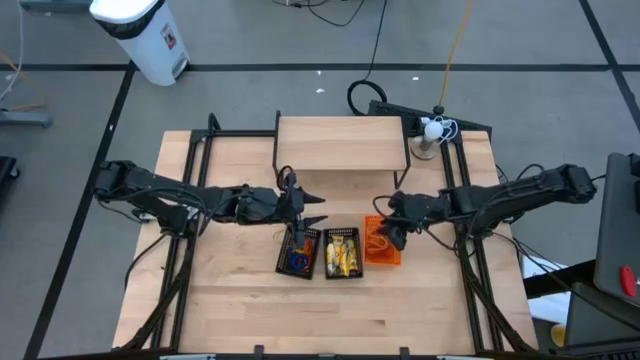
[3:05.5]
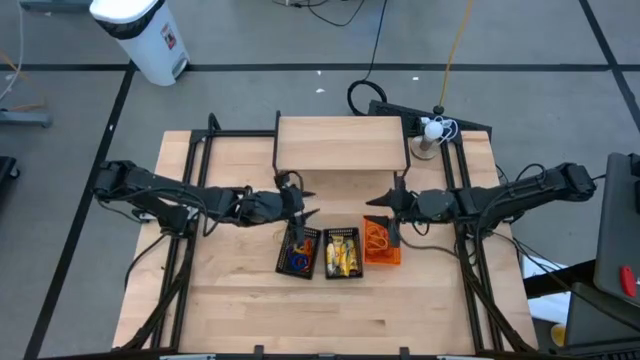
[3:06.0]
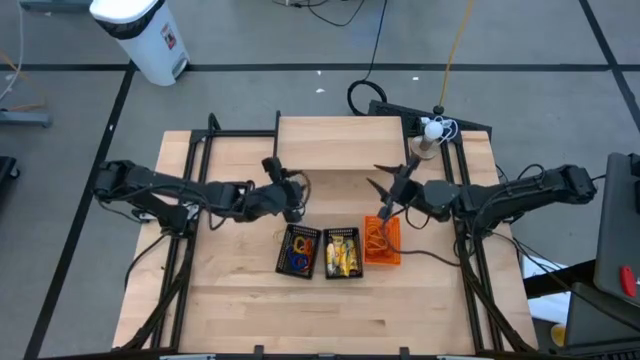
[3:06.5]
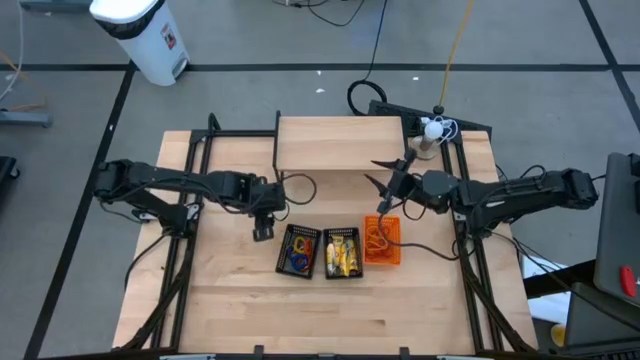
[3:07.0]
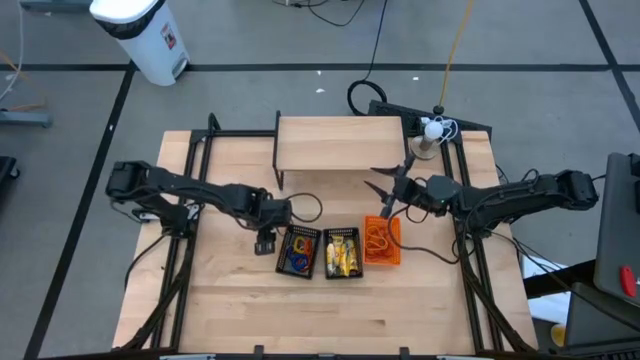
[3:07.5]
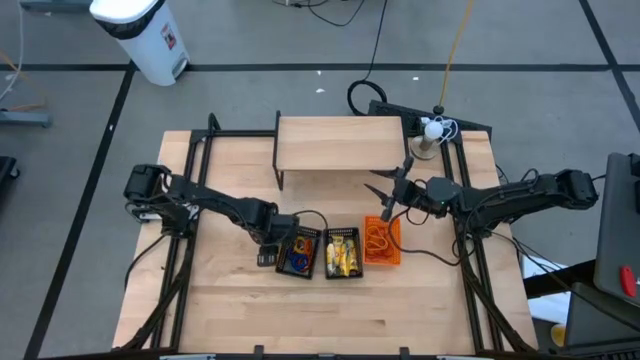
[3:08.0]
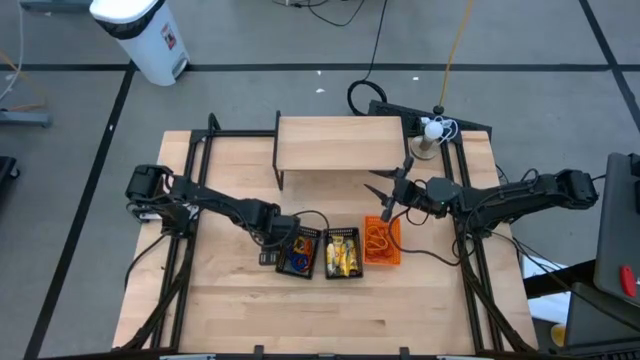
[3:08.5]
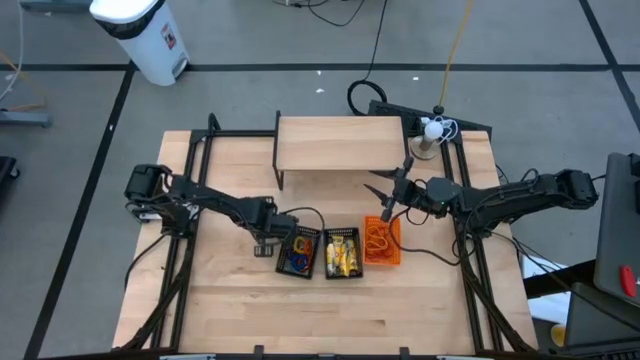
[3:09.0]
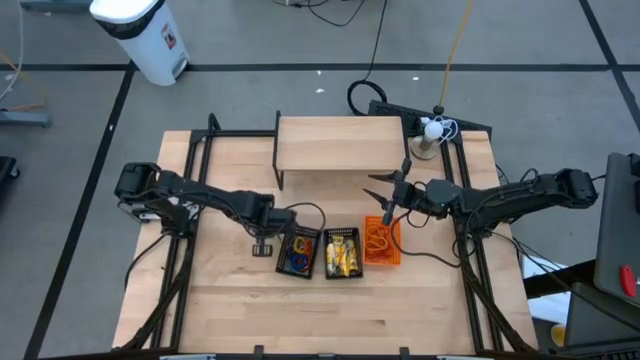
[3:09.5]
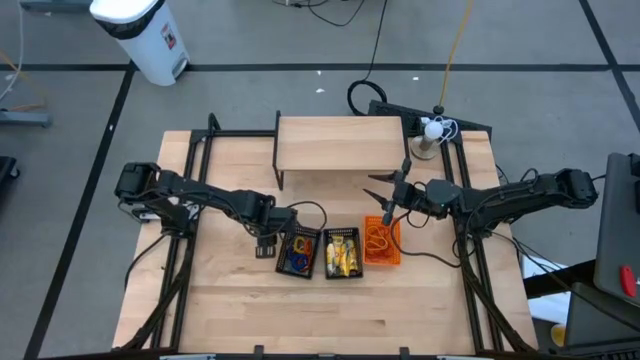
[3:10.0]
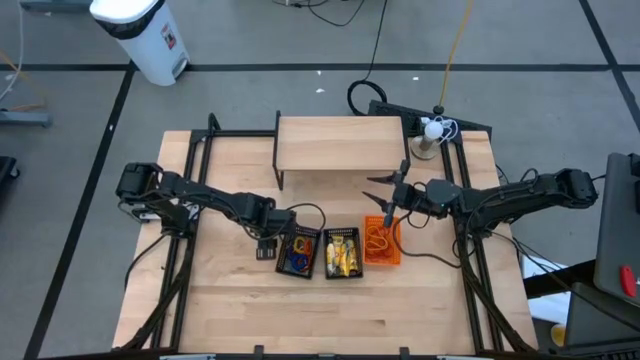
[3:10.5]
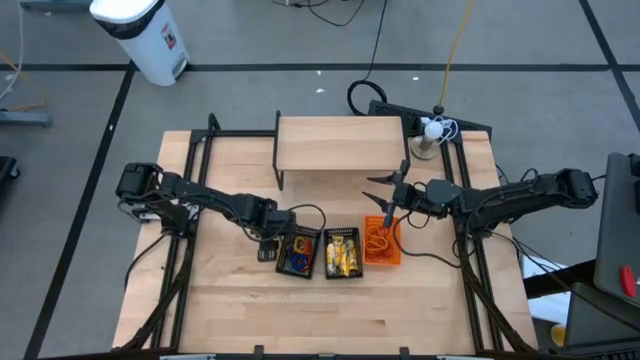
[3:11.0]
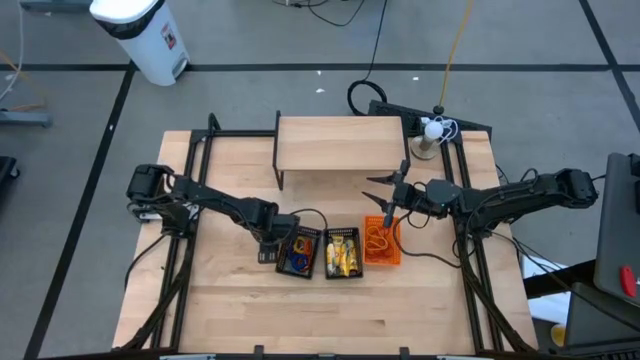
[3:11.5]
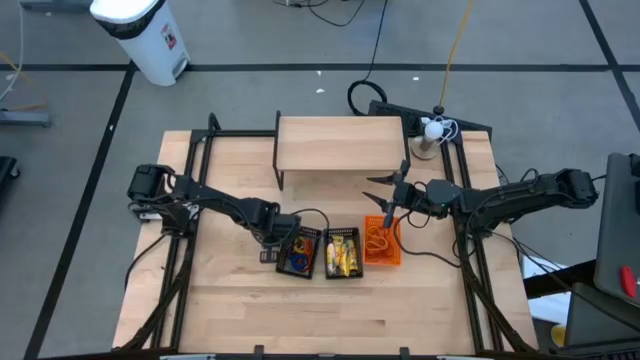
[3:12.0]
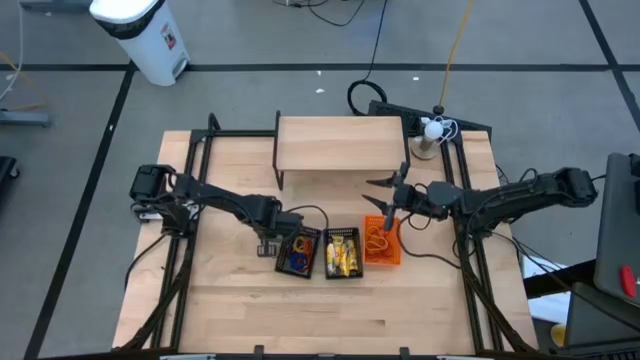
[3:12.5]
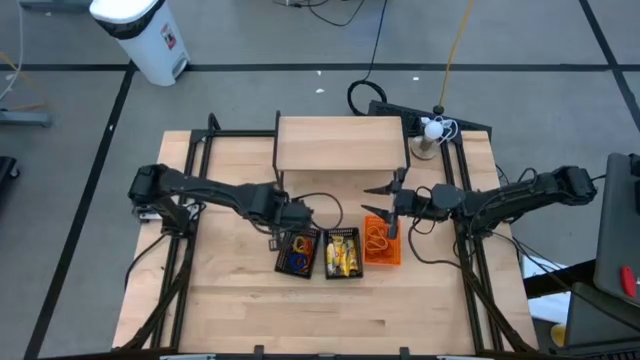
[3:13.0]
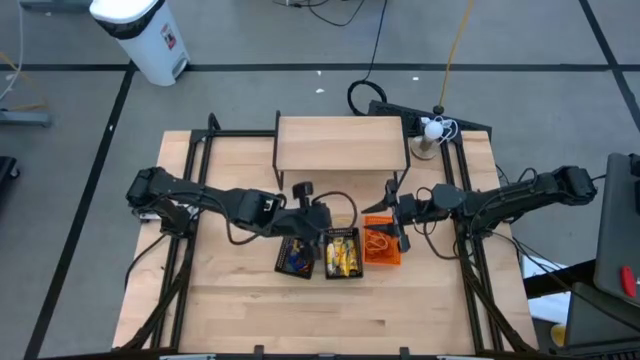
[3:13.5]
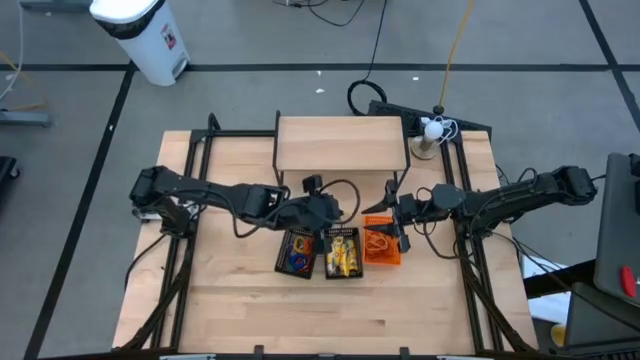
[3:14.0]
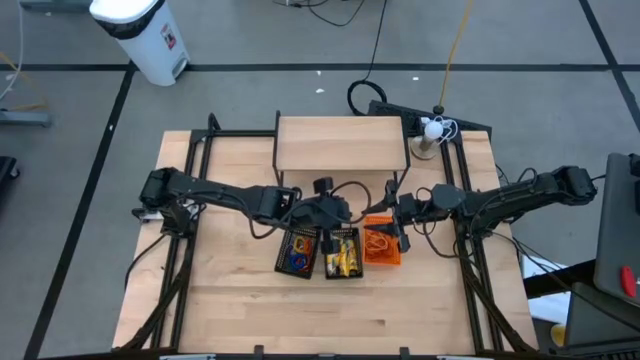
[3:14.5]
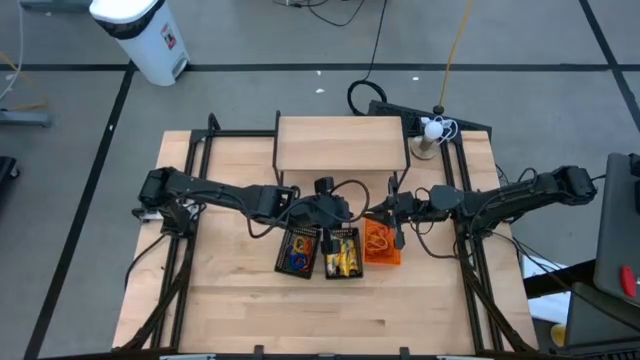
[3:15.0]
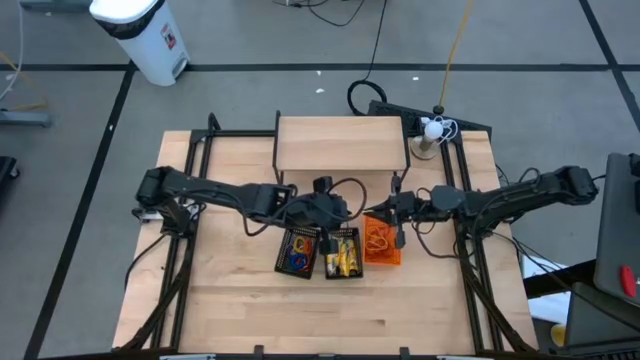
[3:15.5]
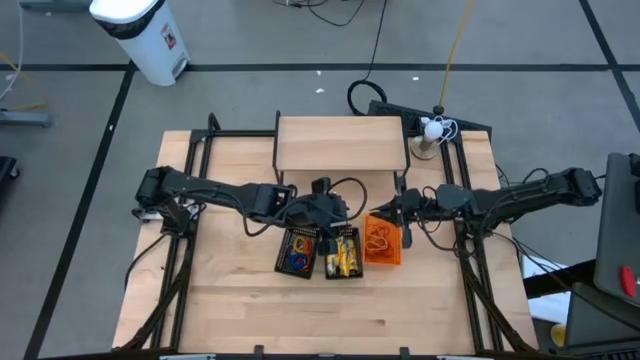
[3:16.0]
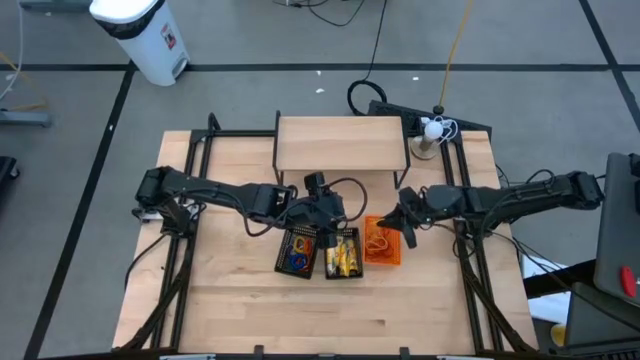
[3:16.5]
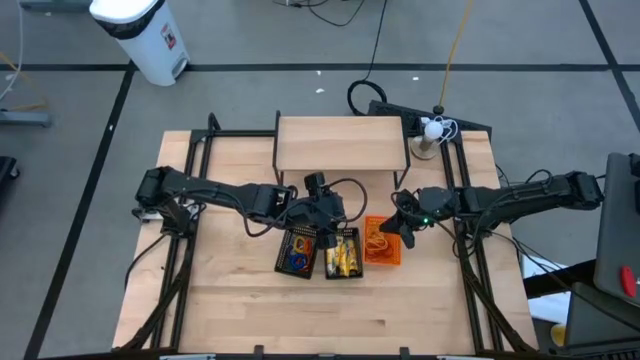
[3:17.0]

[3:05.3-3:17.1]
Task: Pick & Place Office Desk Supplies
Put the yellow rubber band into the orange basket

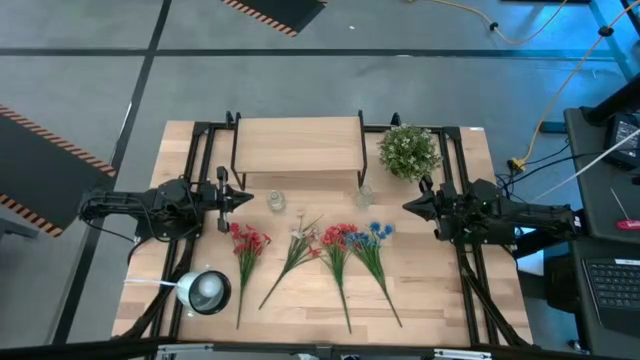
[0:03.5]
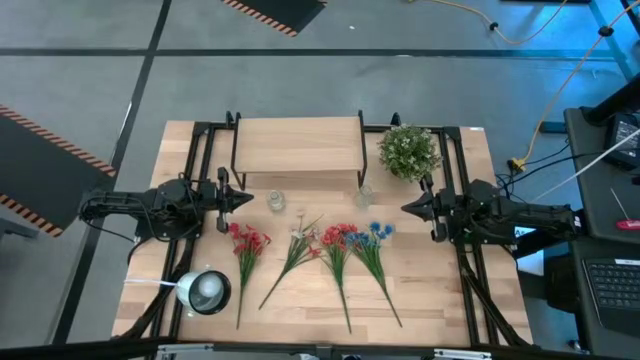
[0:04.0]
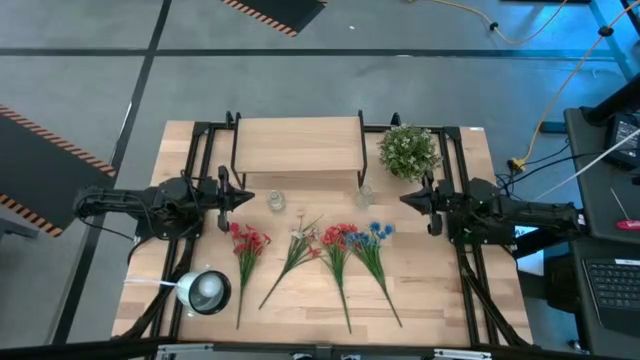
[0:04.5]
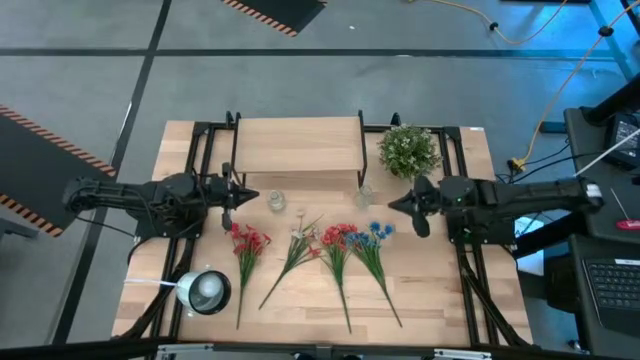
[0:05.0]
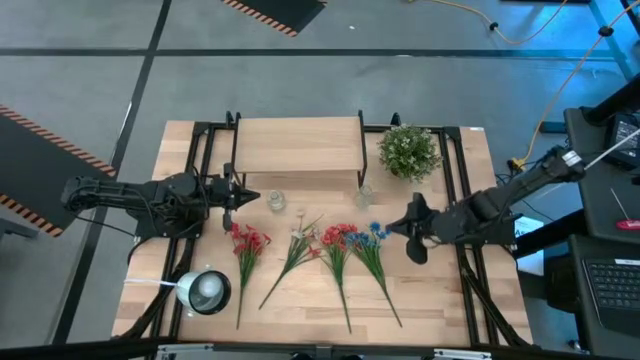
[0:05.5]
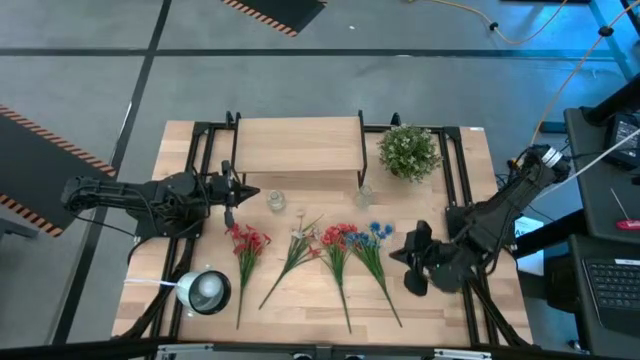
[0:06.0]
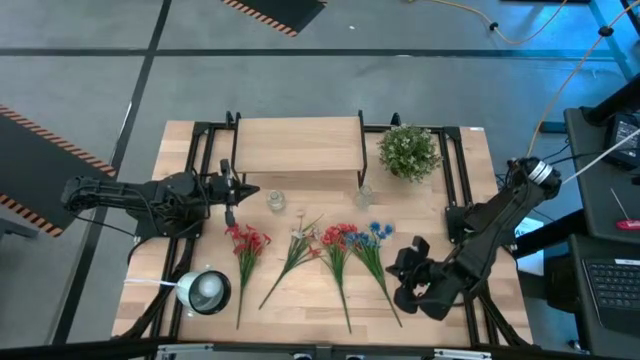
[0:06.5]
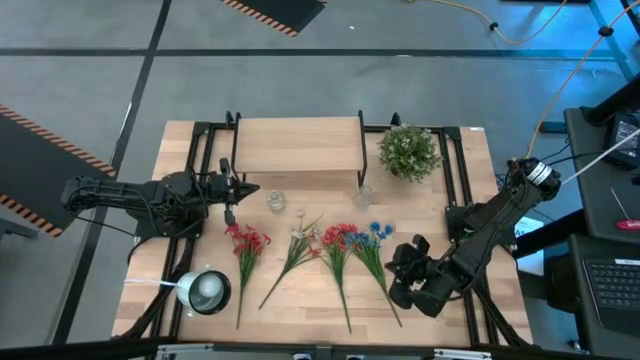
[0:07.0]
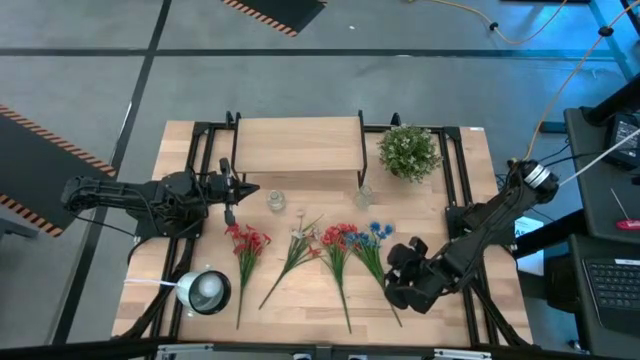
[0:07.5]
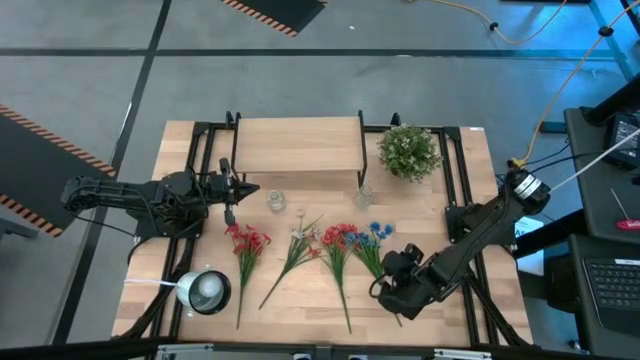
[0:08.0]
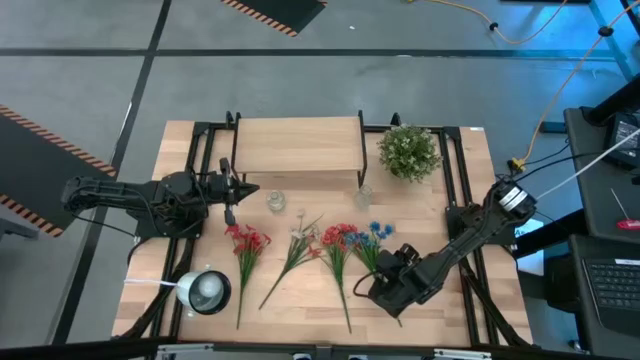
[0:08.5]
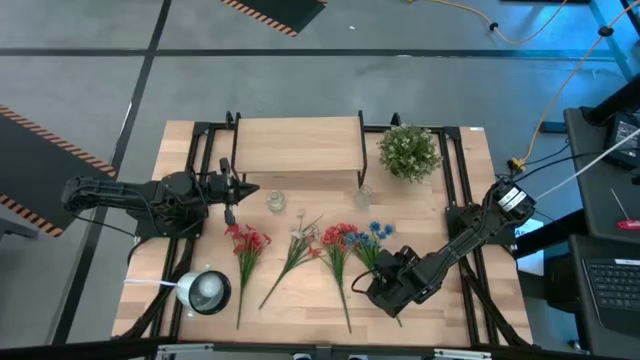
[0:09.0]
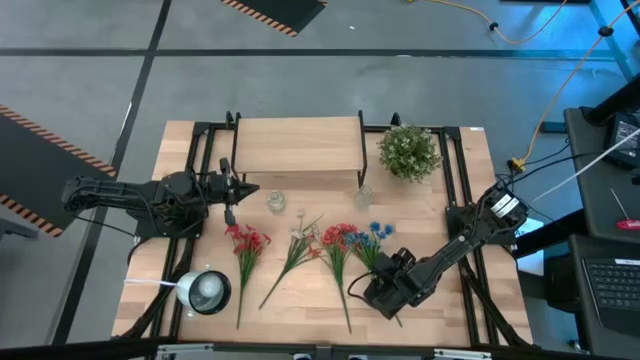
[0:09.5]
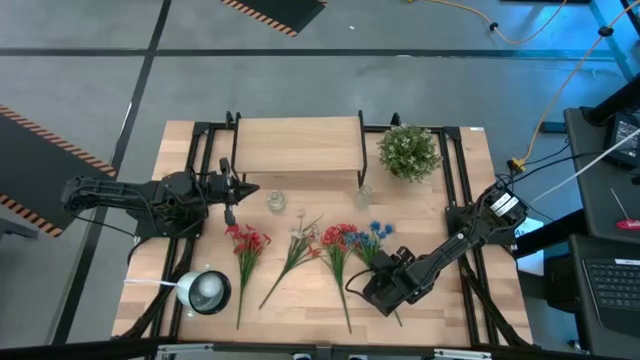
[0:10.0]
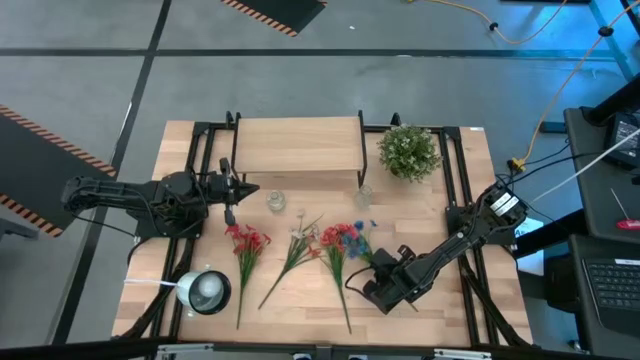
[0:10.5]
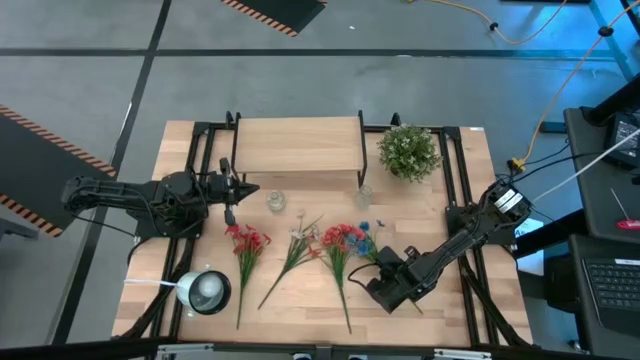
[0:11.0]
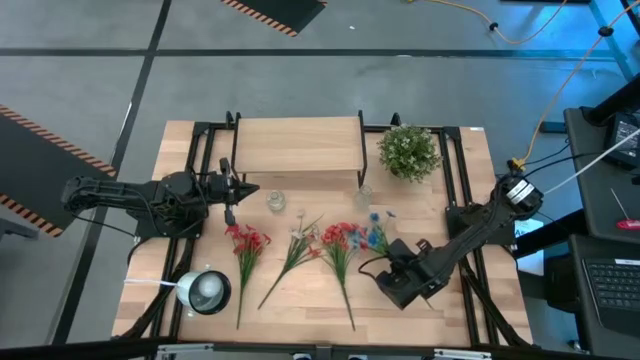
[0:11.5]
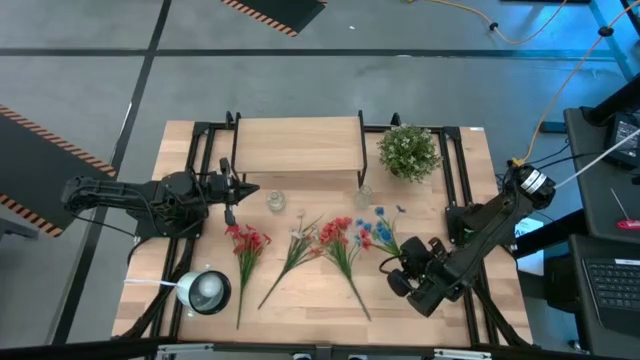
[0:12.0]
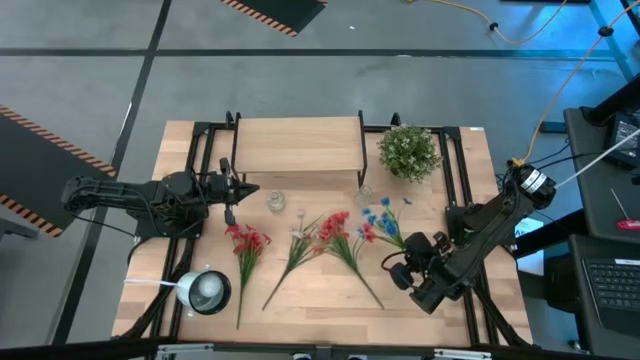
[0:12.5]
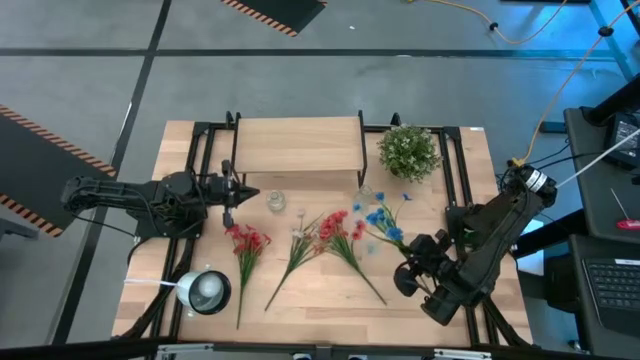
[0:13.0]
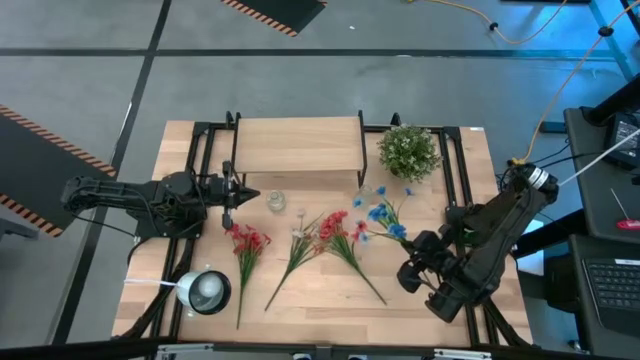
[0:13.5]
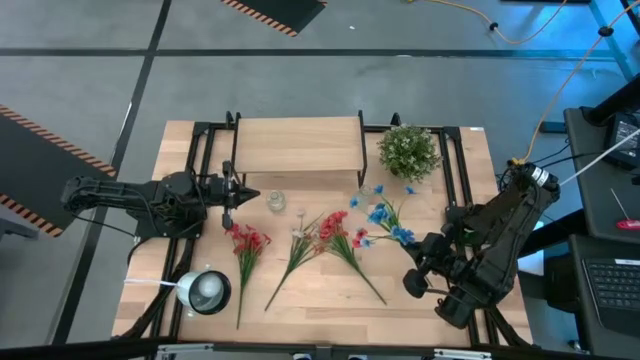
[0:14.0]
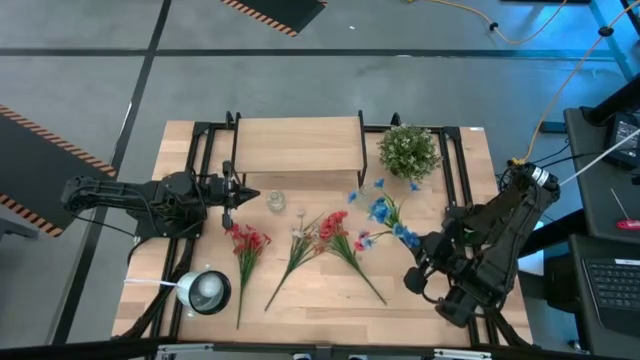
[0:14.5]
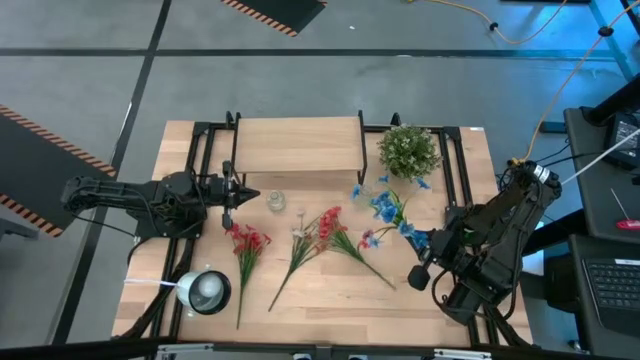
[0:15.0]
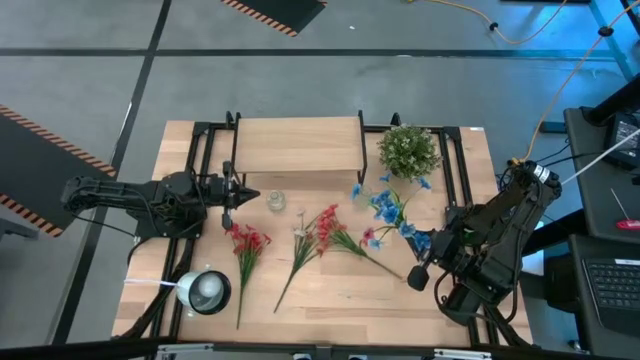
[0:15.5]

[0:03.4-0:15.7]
Task: Pick and place flowers into a vace then onto a shelf
Put the blue flowers into the right transparent vase
